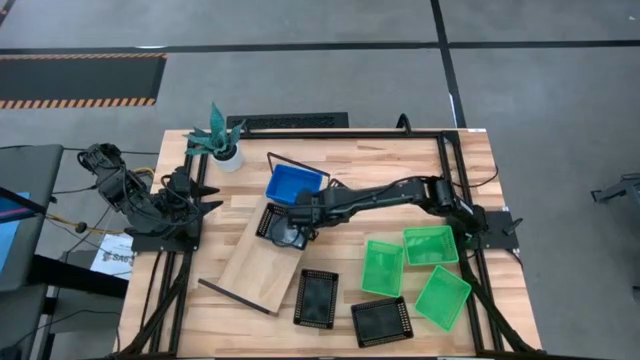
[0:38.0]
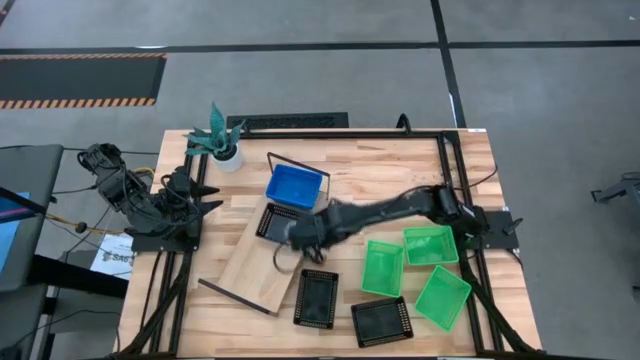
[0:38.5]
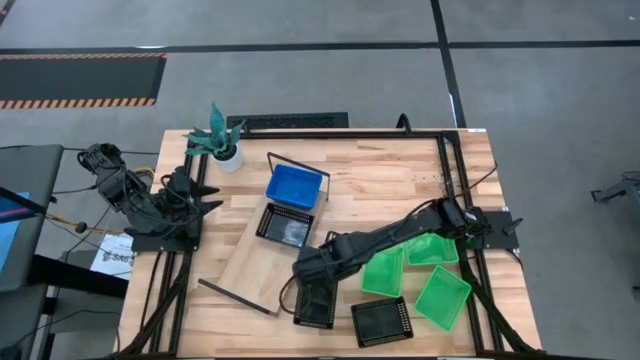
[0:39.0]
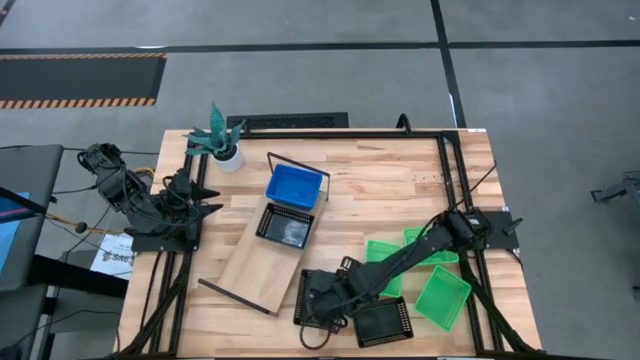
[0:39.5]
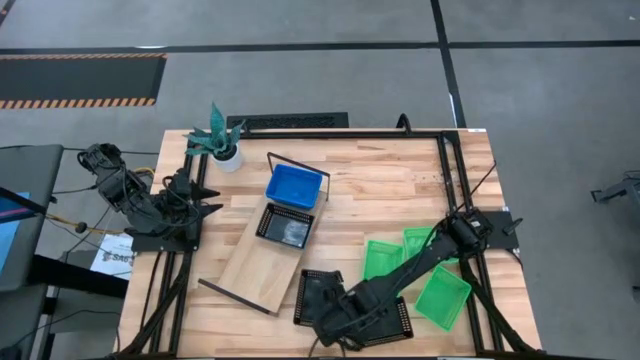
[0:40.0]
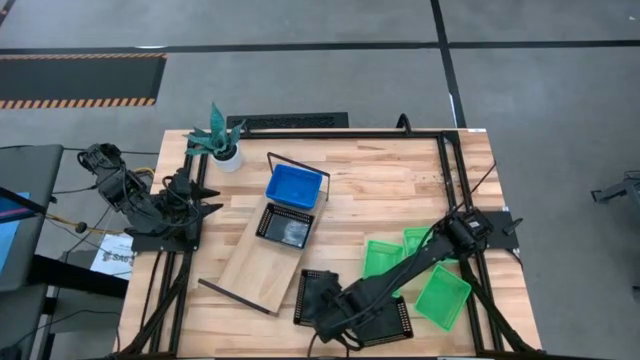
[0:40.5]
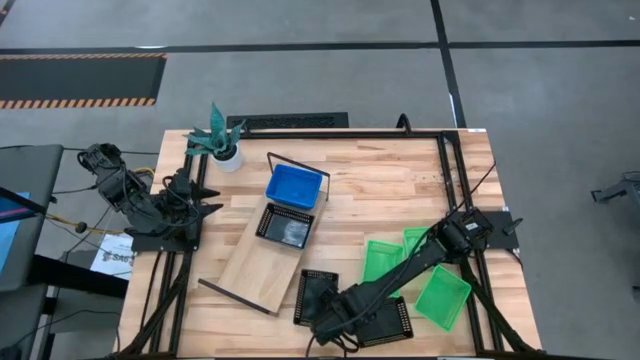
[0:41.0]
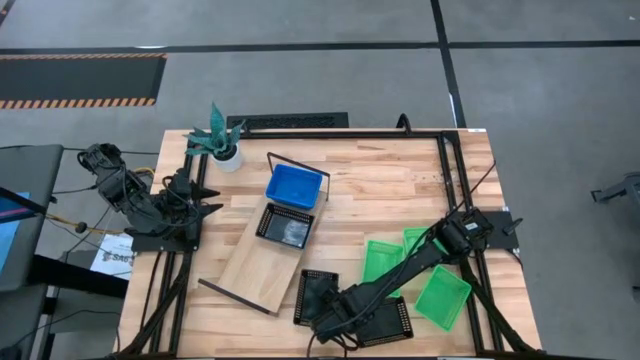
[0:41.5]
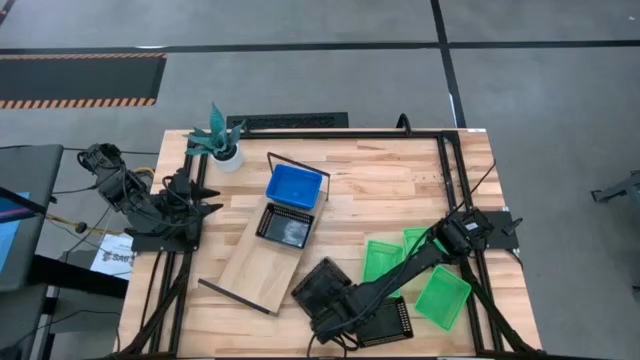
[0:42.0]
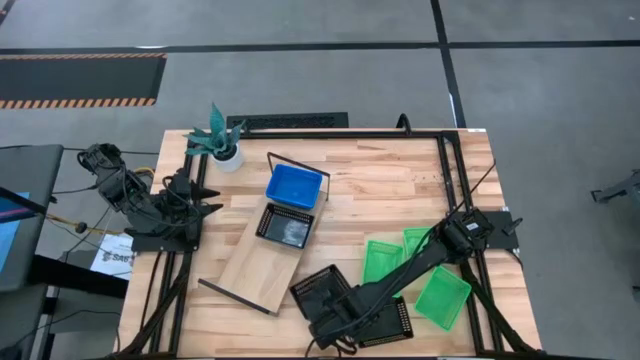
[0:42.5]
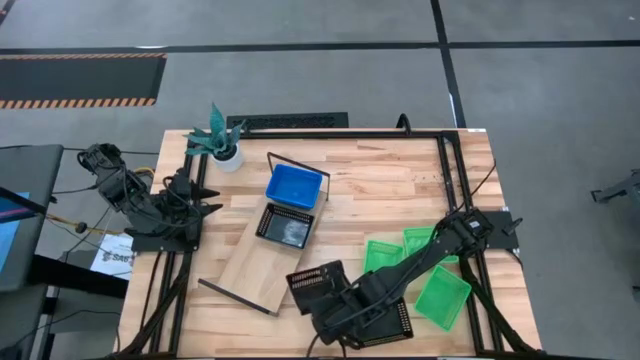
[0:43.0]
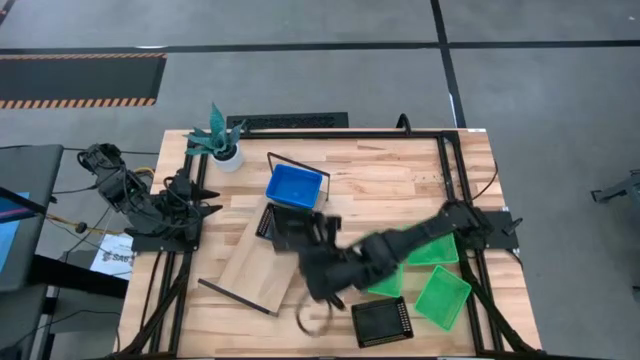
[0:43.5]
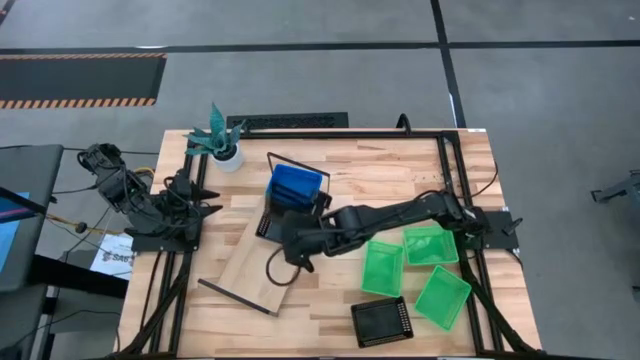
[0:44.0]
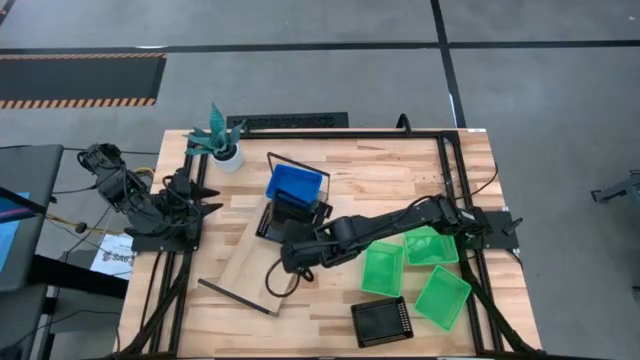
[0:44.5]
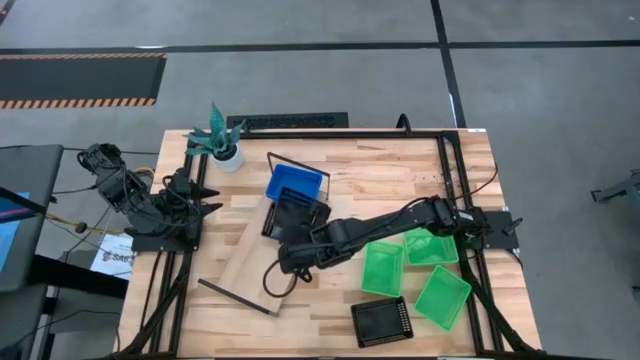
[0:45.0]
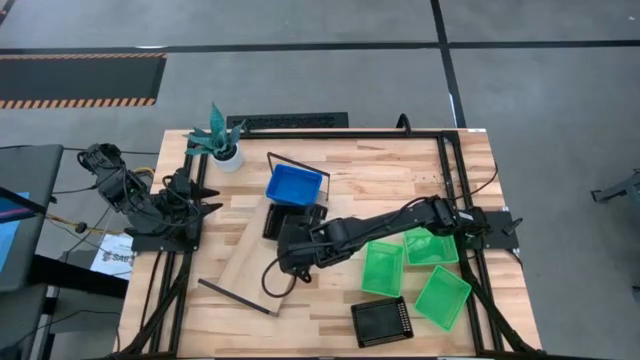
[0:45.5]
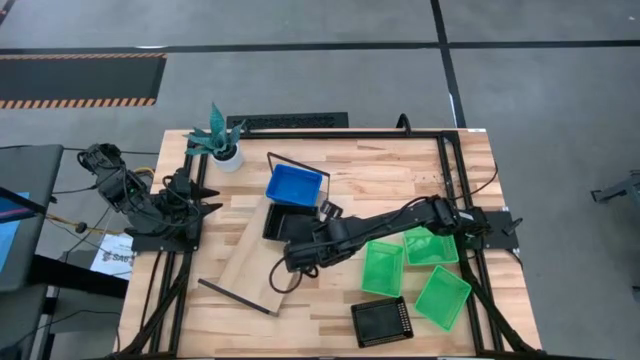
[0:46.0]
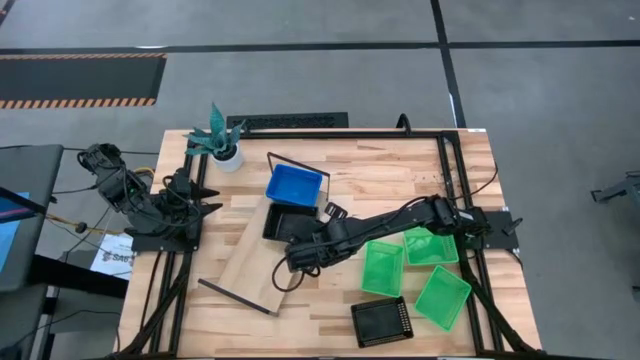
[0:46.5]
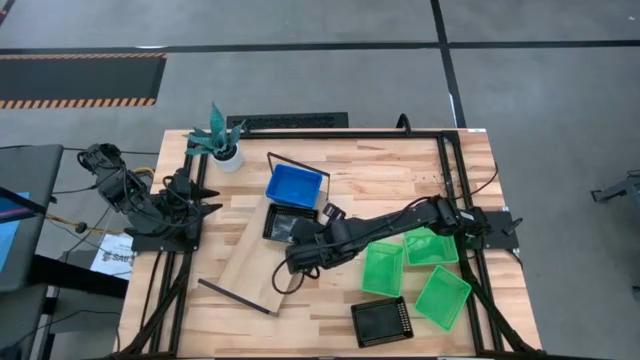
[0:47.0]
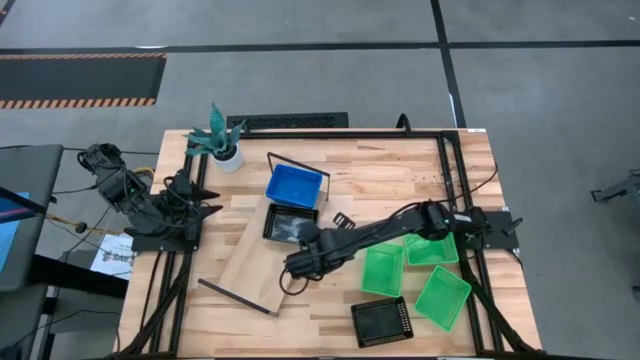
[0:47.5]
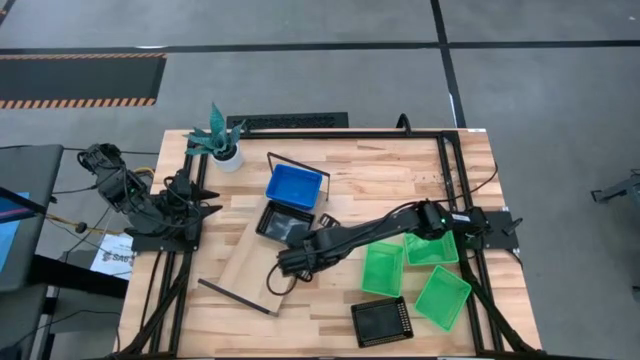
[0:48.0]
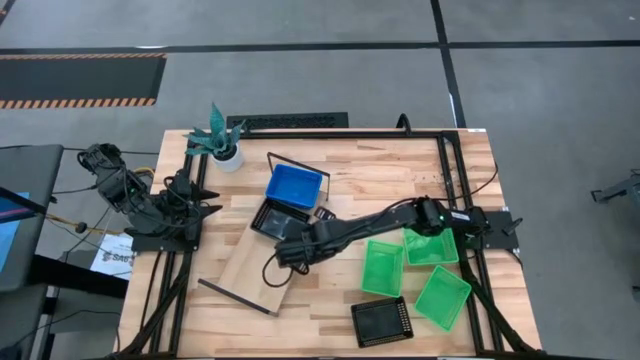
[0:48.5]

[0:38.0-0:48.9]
Task: Stack baskets on shelf by color
Stack the left black bin on top of the black bin on the shelf

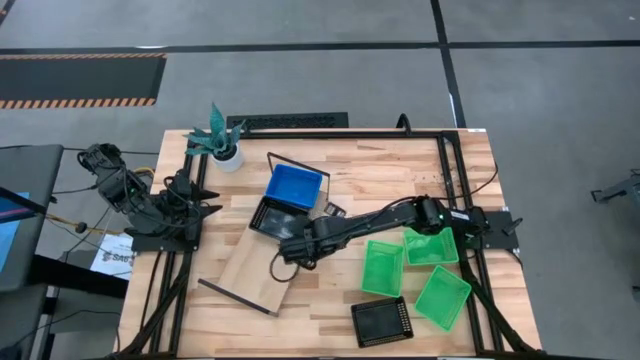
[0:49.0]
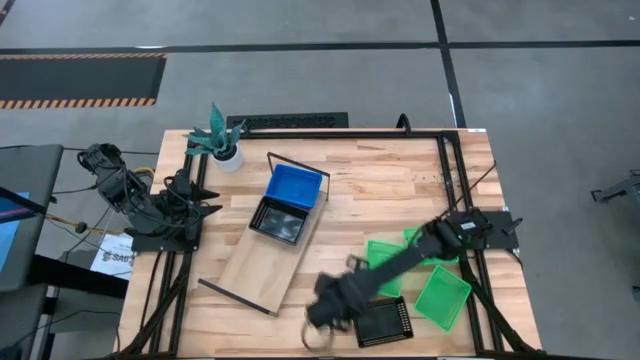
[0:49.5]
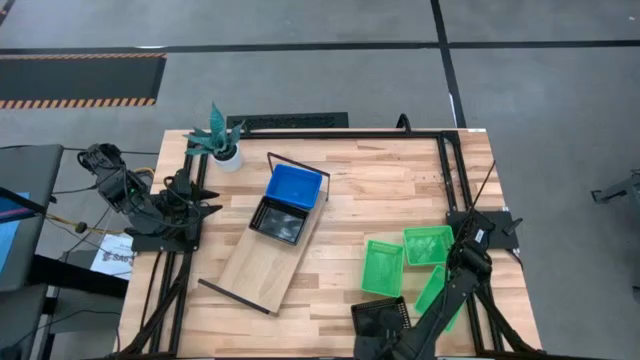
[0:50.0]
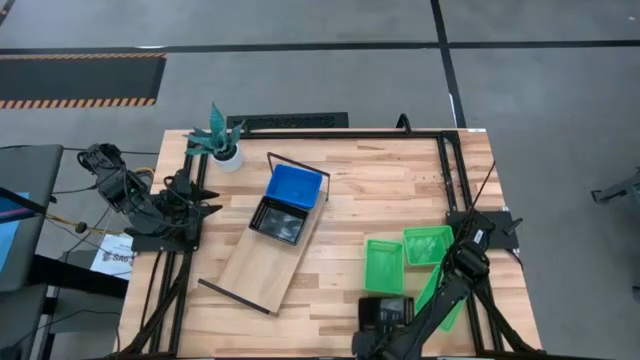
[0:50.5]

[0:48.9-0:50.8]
Stack the black bin on top of the black bins on the shelf

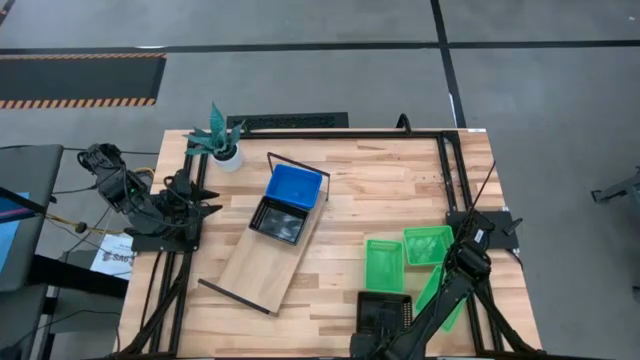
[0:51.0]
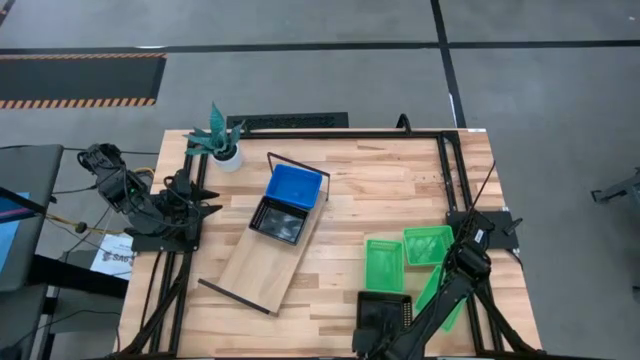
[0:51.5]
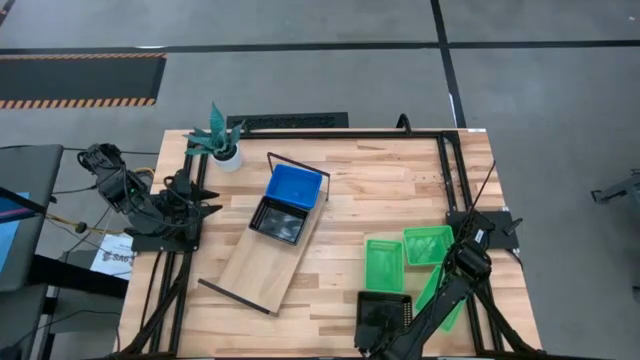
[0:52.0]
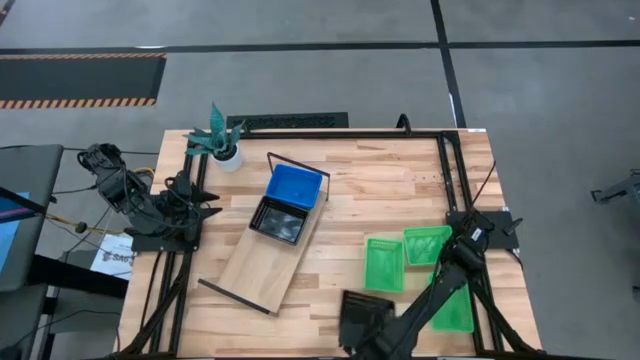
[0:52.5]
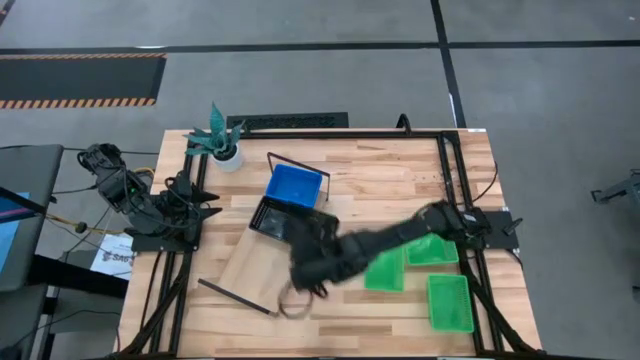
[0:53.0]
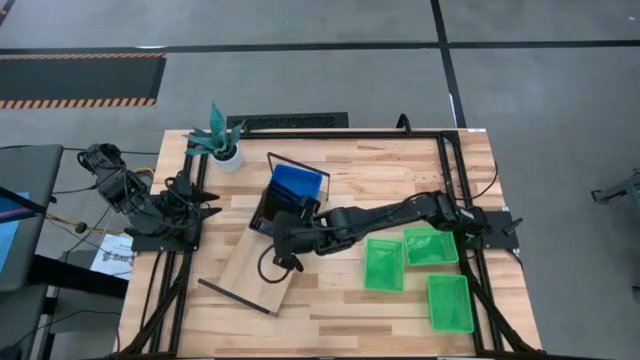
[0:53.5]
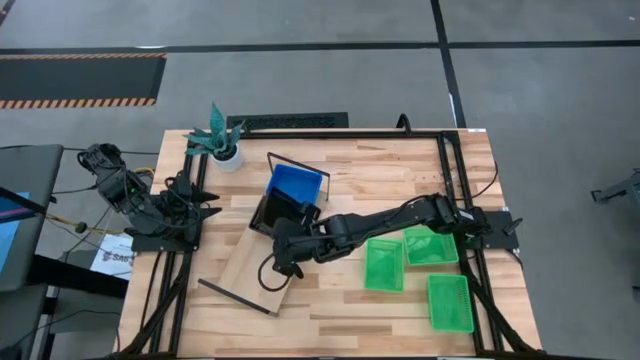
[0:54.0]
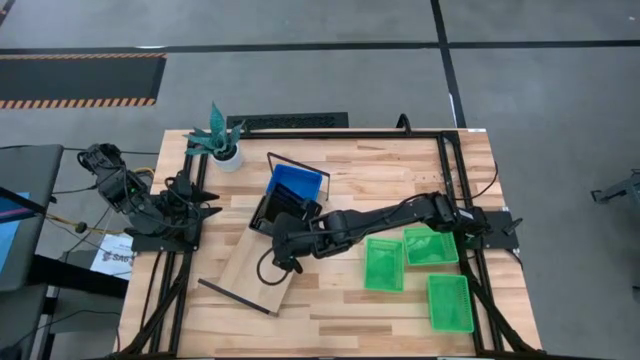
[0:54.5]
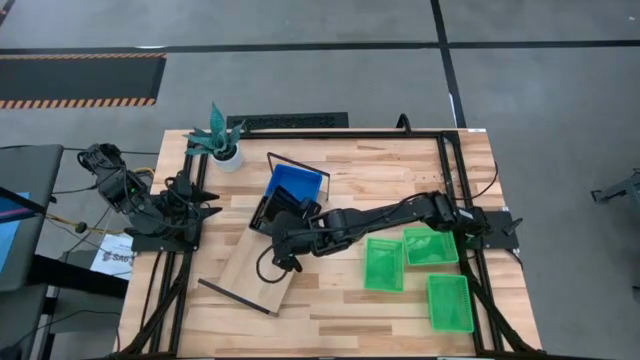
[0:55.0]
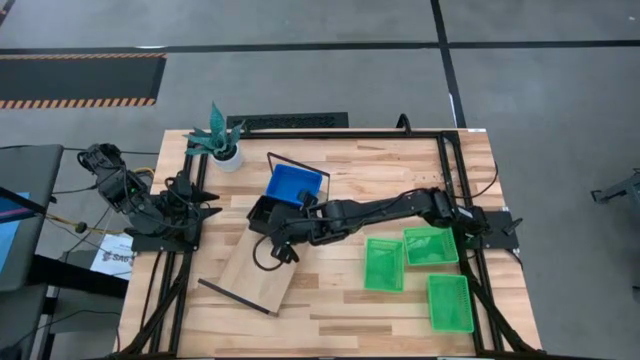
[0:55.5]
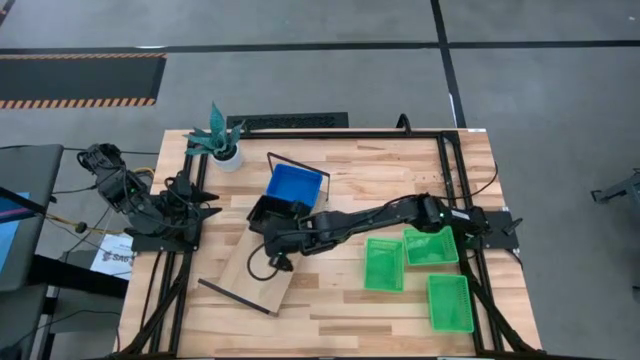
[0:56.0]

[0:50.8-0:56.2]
Stack the black bin on top of the black bins on the shelf

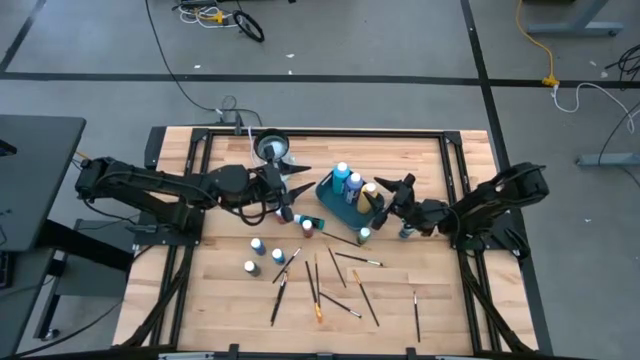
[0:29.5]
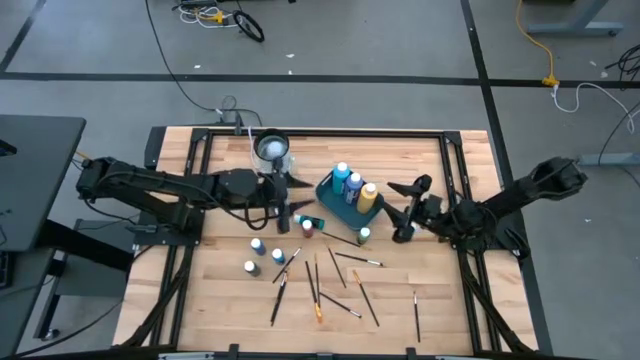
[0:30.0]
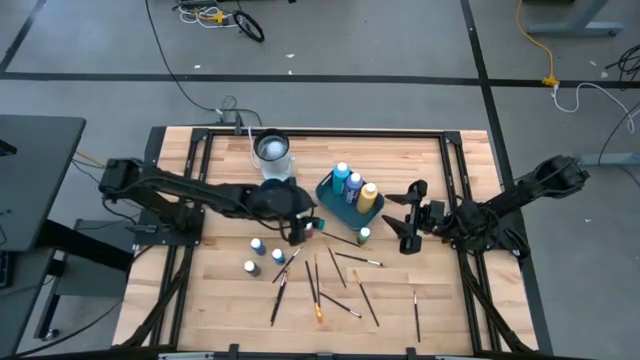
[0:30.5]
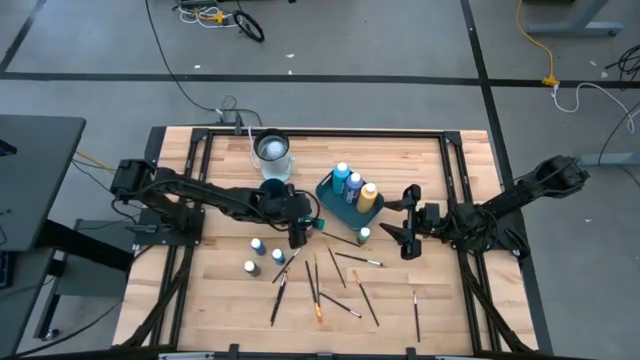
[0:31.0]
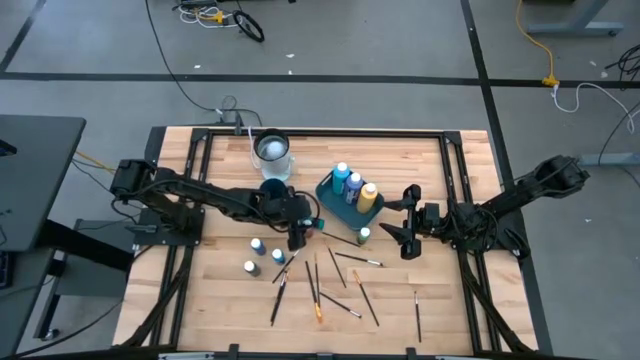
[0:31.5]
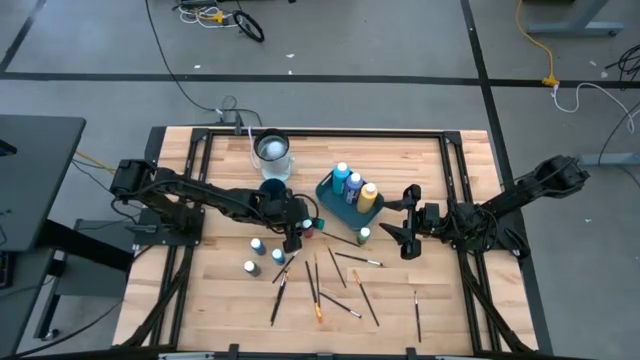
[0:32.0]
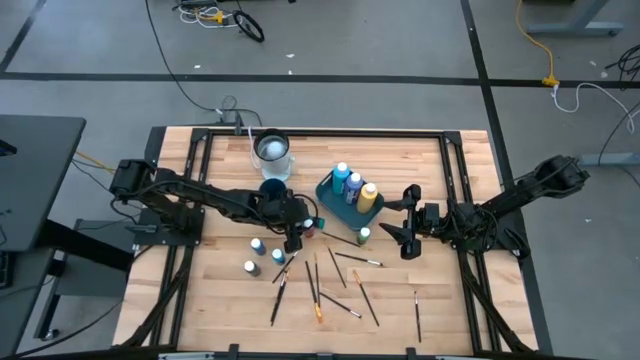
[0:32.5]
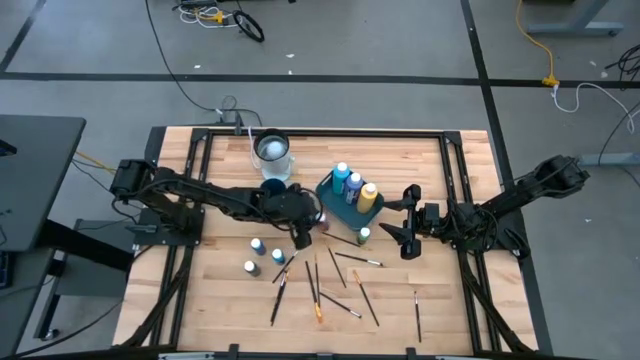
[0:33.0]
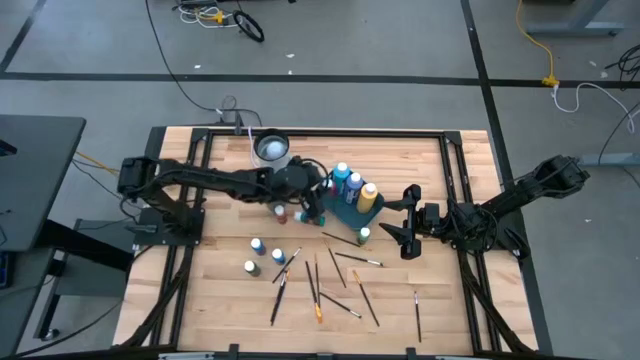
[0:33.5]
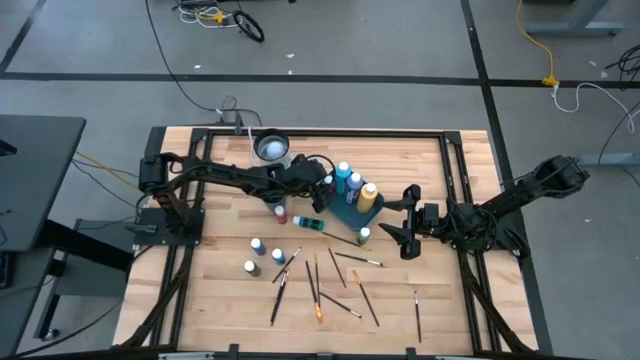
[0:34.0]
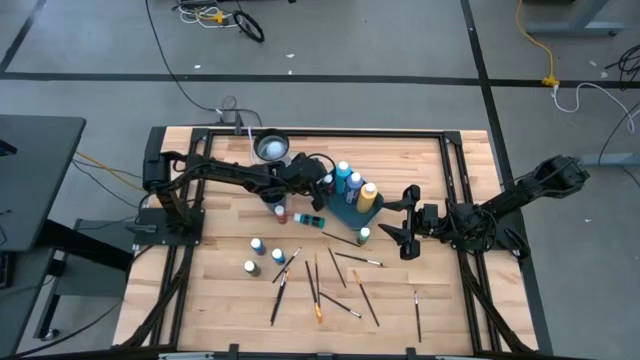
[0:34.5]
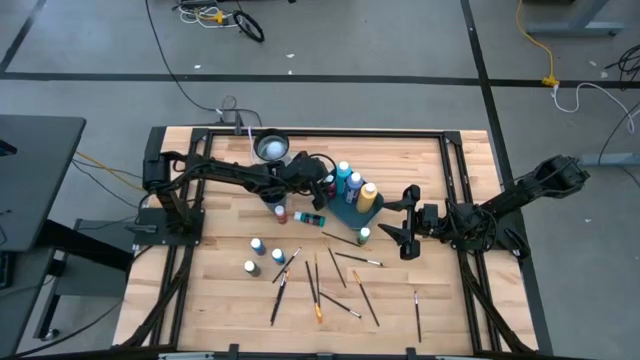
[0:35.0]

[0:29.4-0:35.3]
Task: Pick & Place Paint Supplies
Put the red paint bottle into the blue bin
